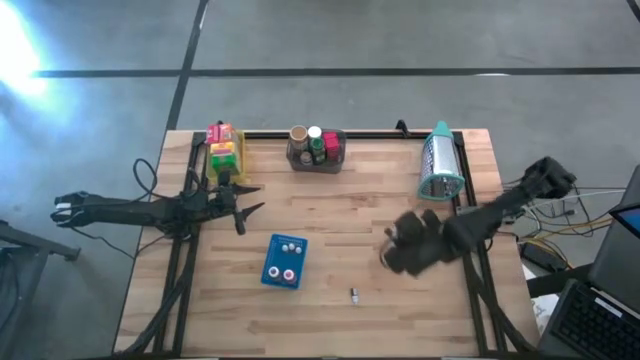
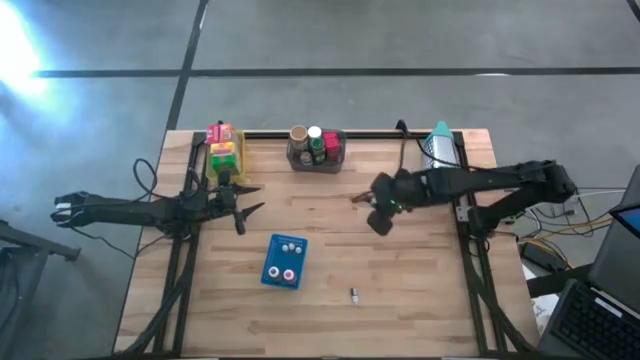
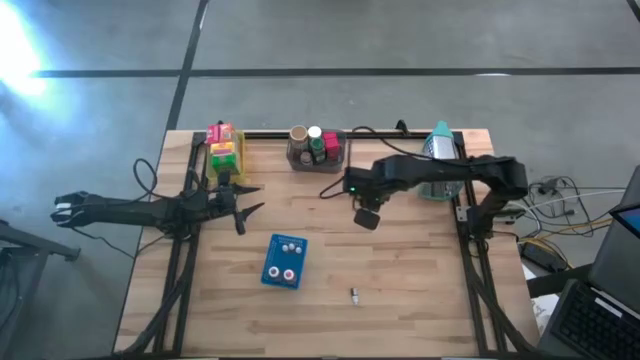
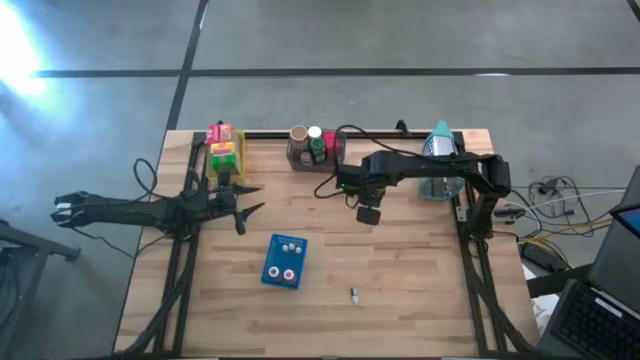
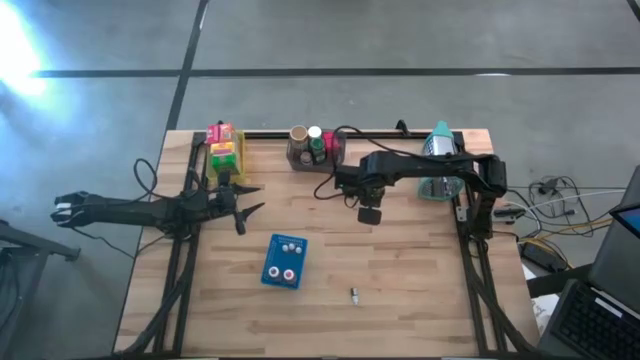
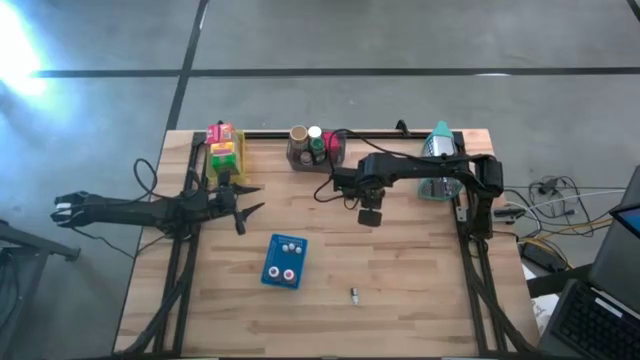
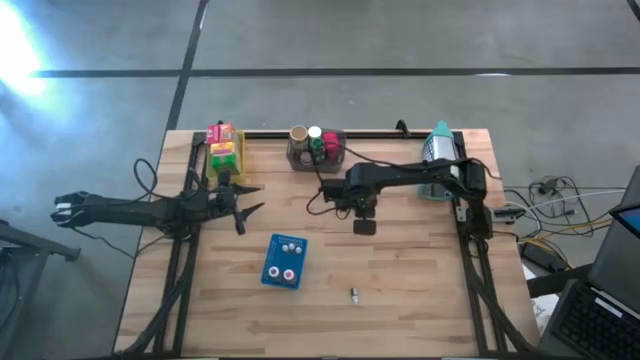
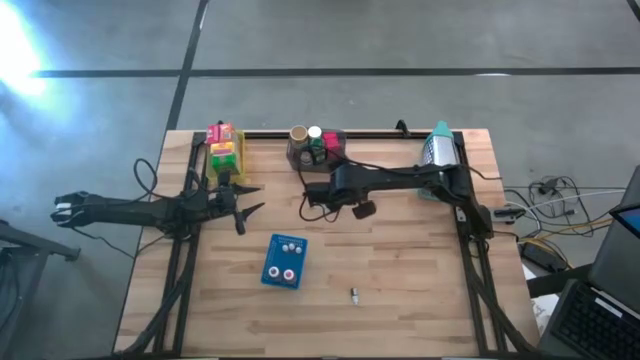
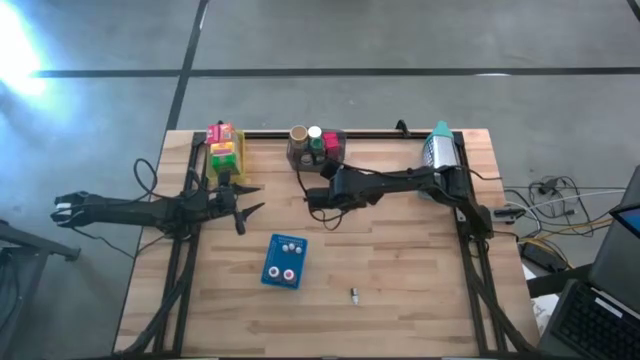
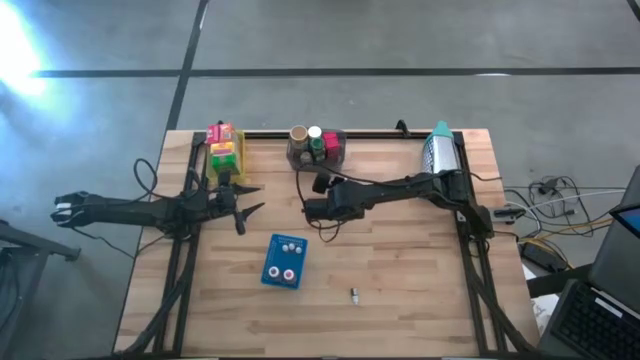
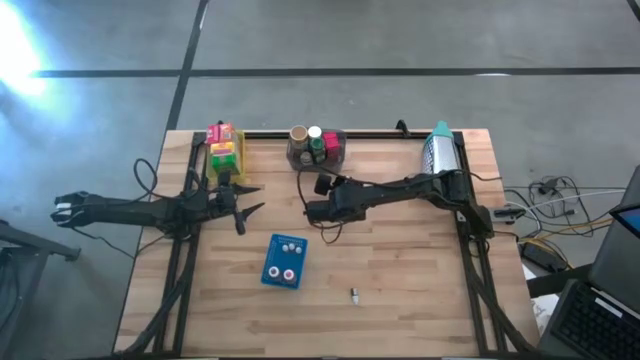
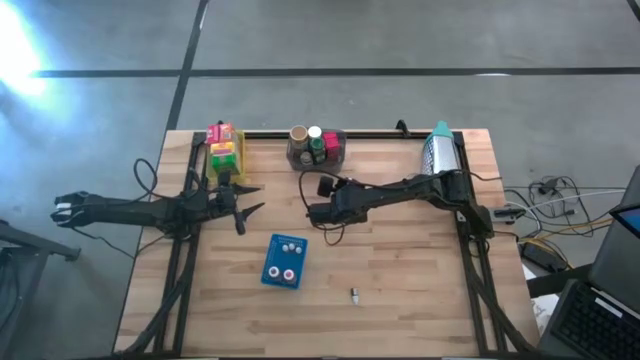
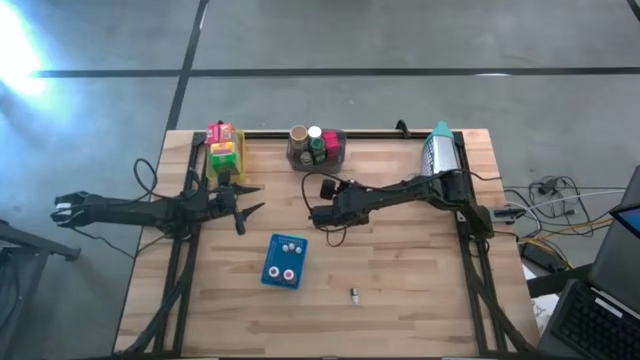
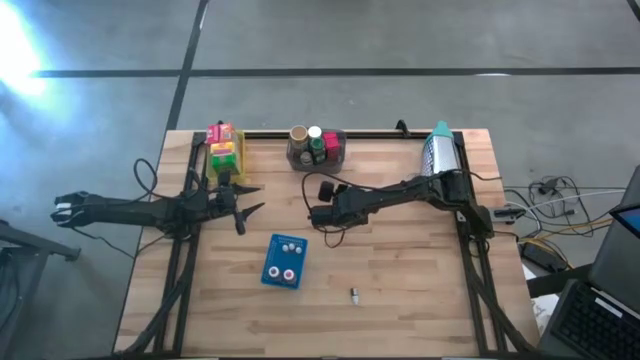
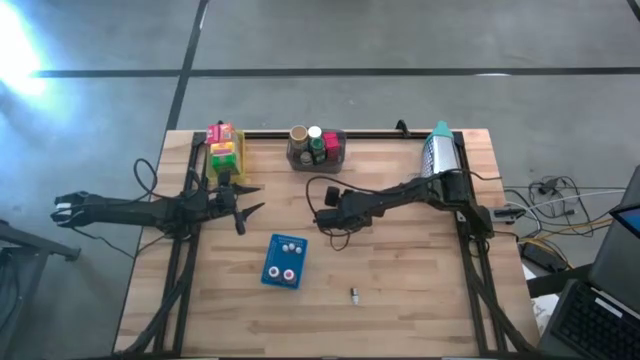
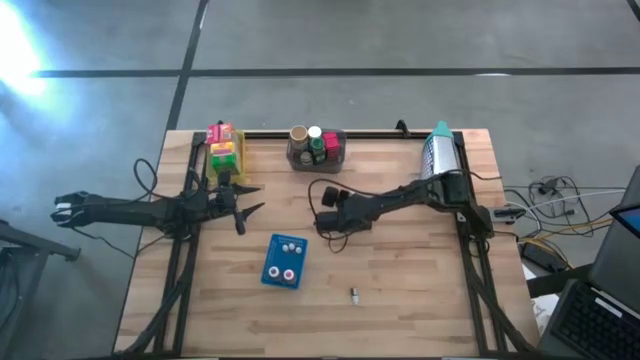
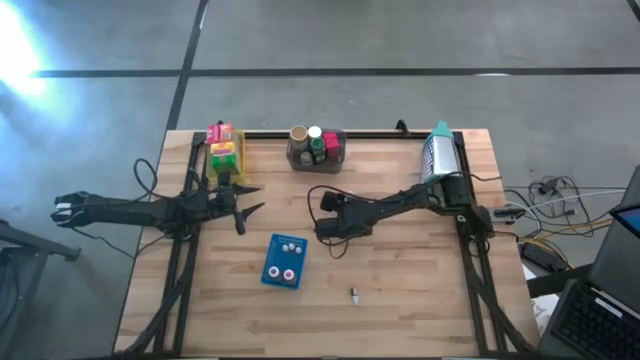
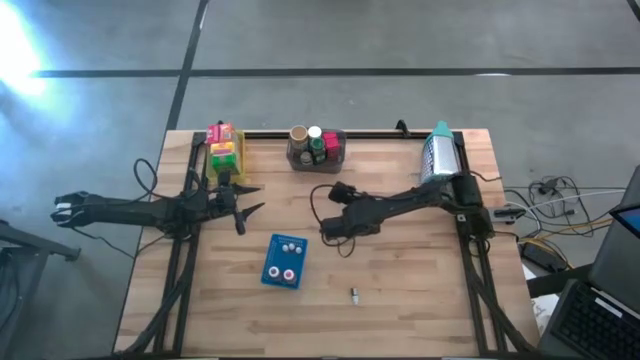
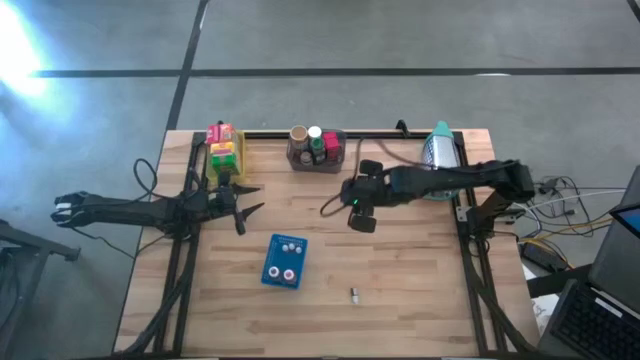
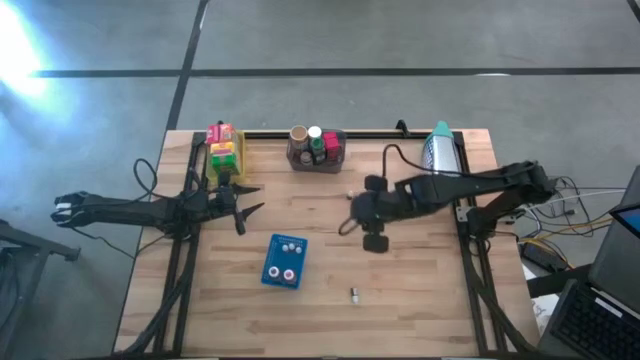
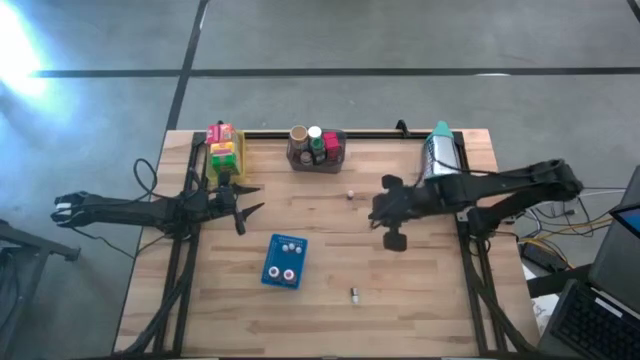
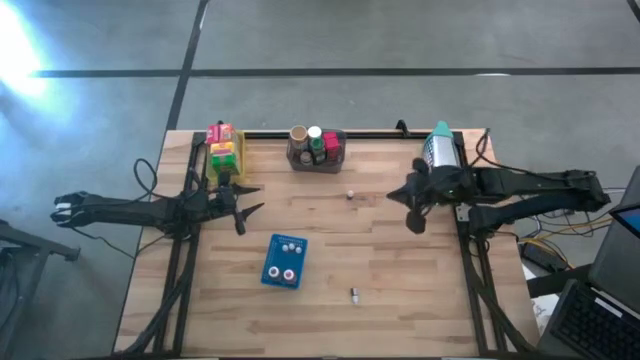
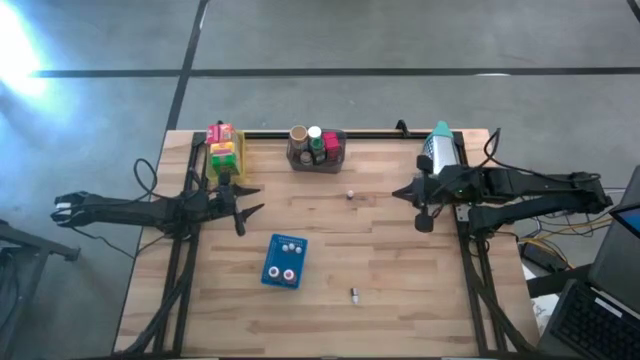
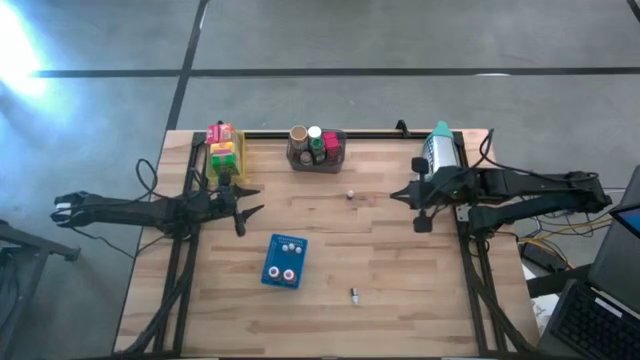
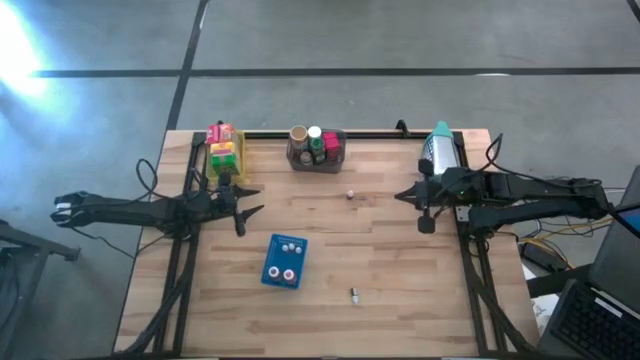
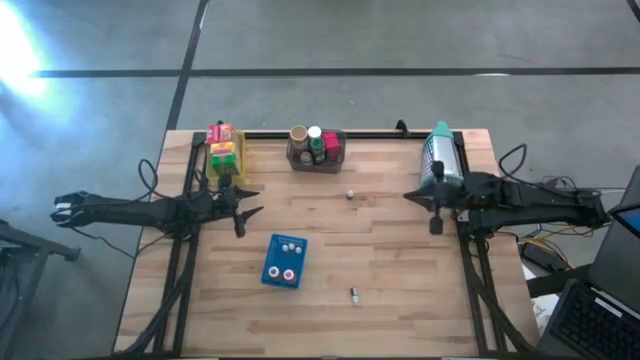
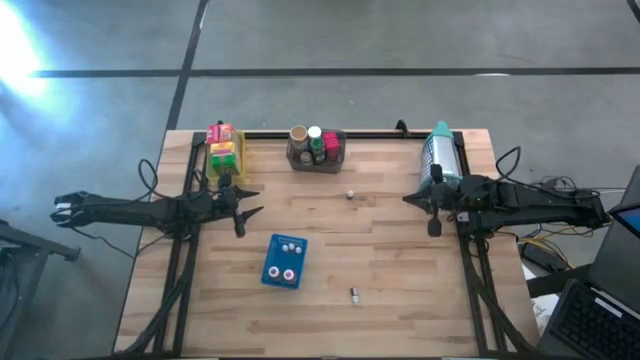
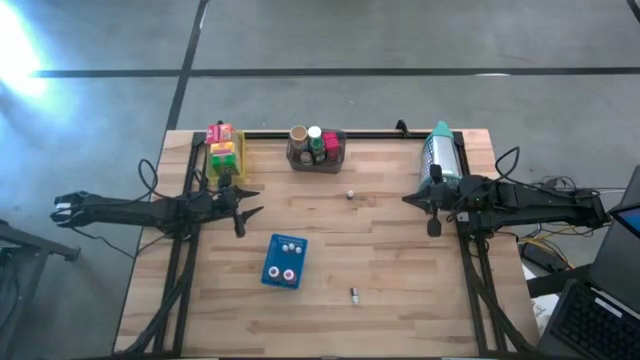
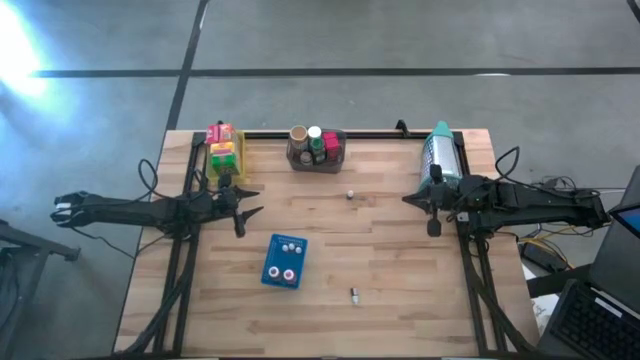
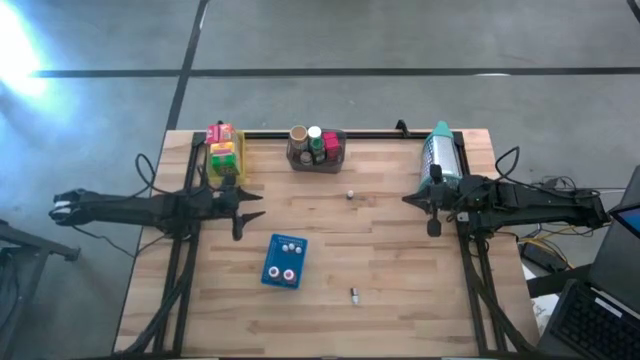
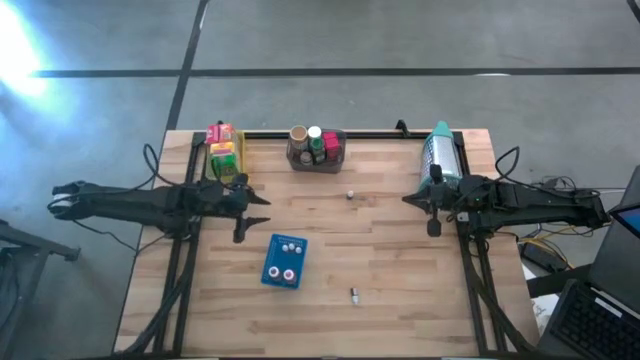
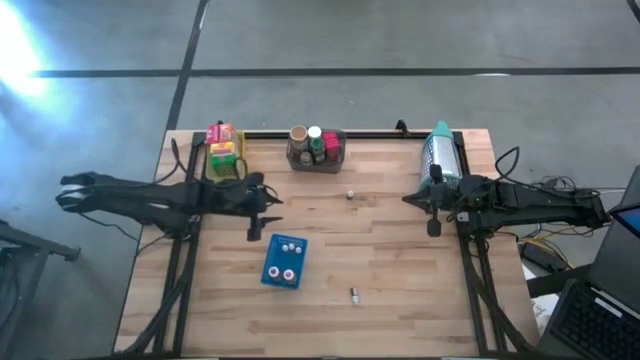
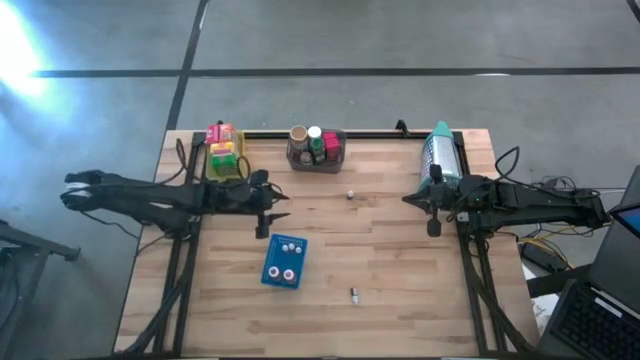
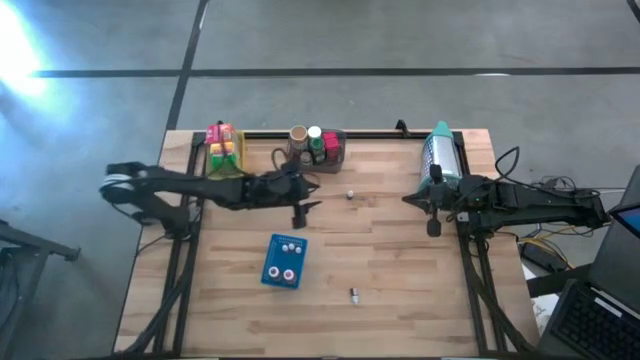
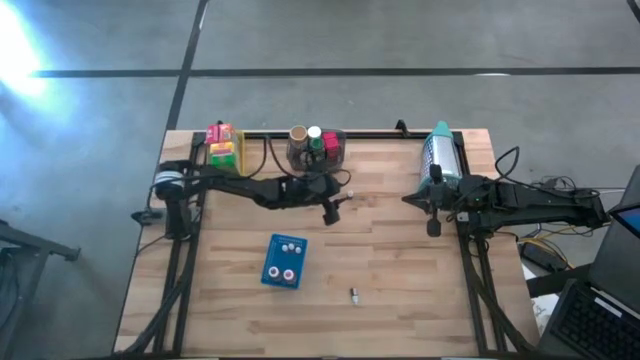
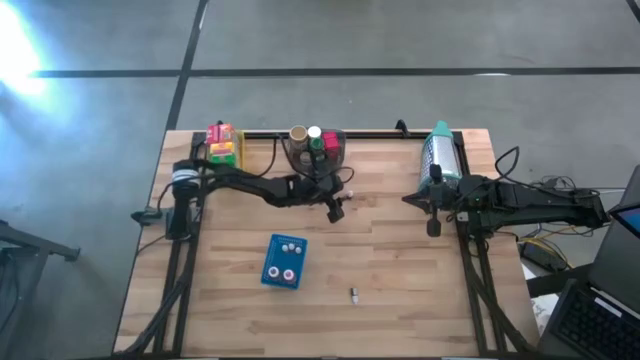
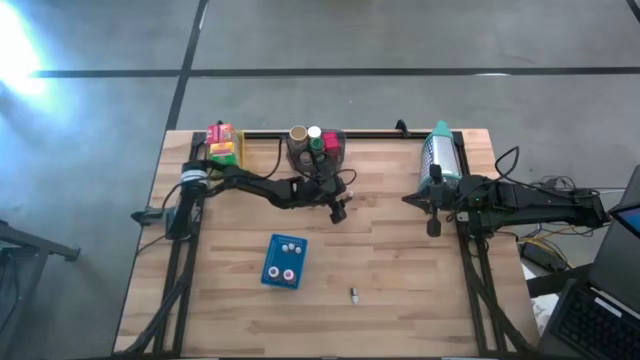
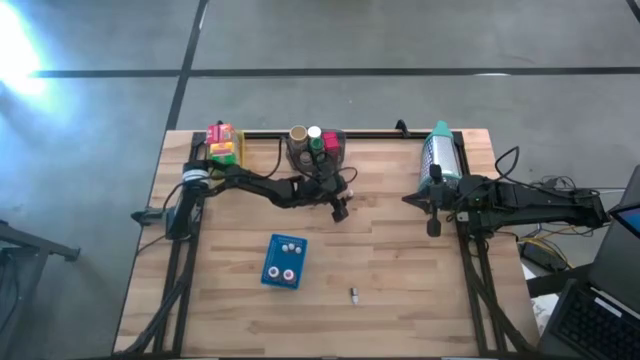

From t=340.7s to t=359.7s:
Task: Pick & Place Kitchen Items
Put the black food coloring bottle into the blue bin

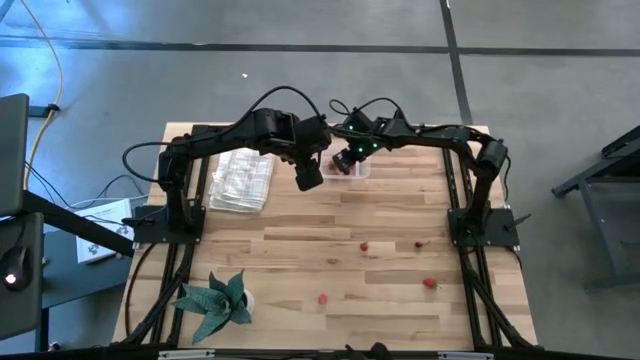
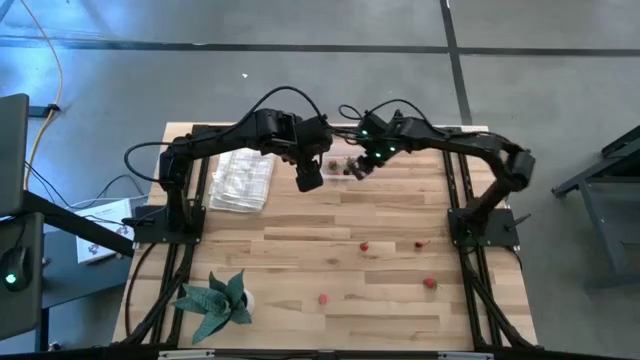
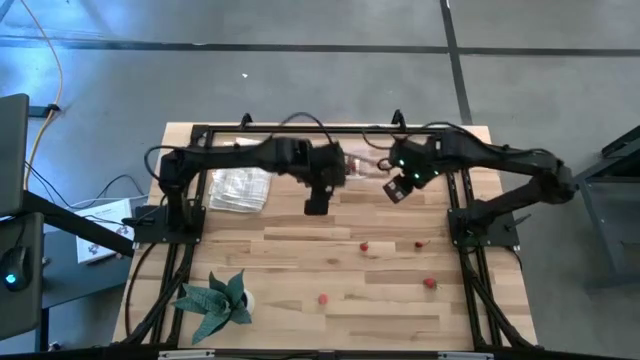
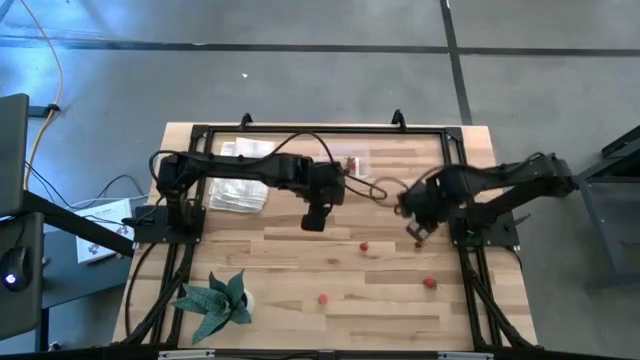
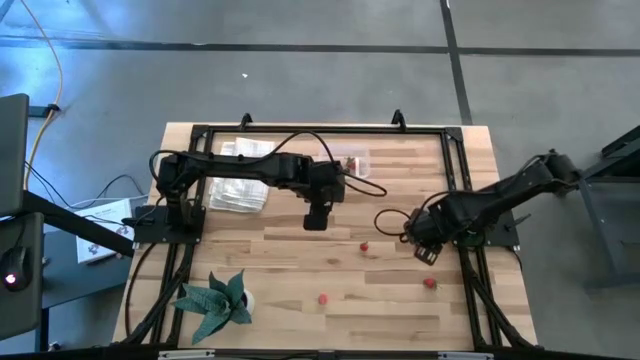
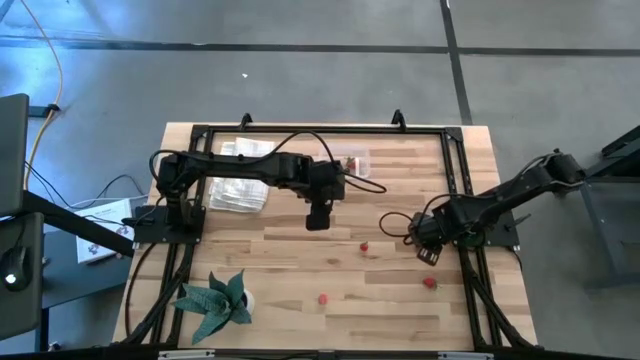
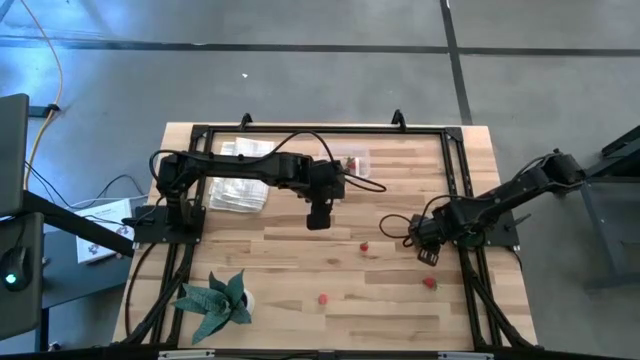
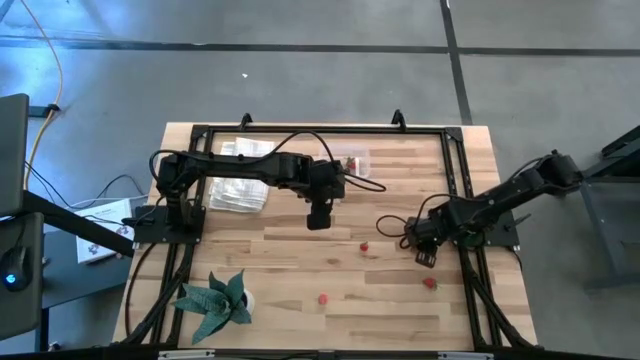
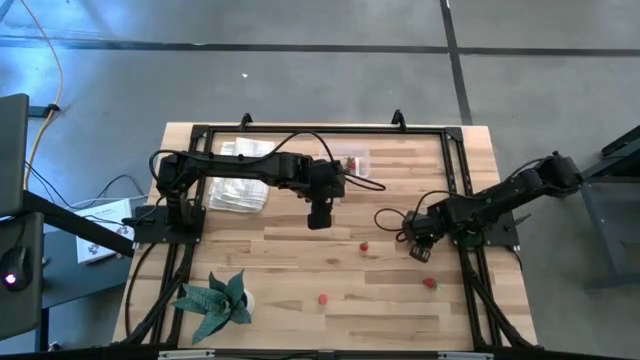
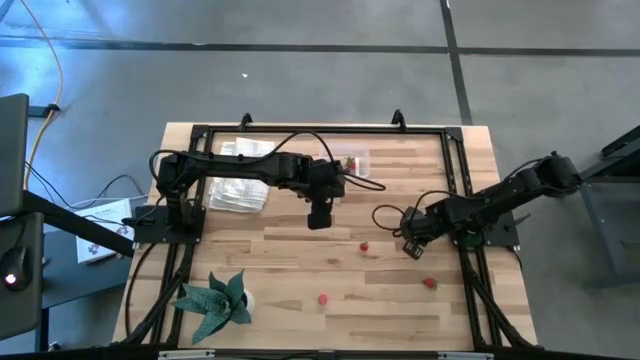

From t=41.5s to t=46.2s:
Task: Pick and placing Produce into tupperware
Put the red cherry into the transparent container
